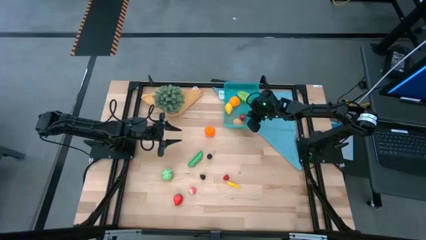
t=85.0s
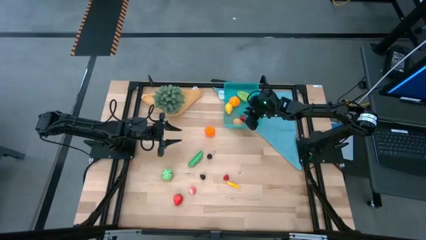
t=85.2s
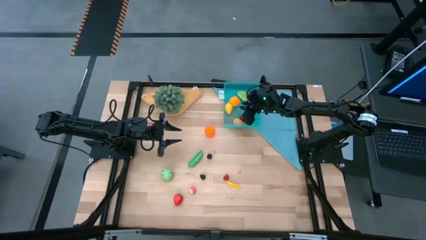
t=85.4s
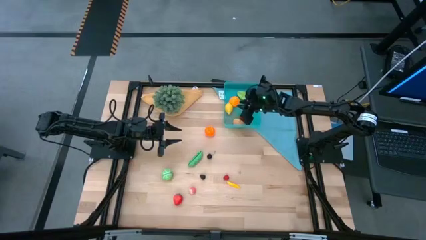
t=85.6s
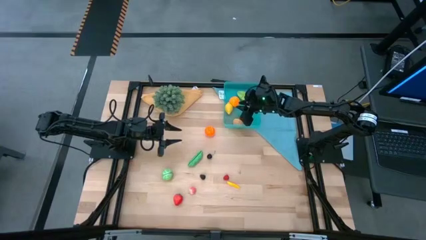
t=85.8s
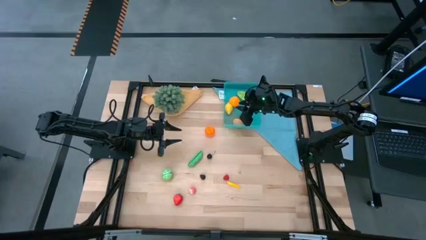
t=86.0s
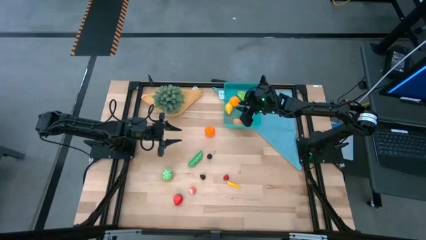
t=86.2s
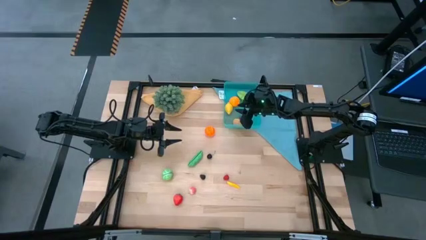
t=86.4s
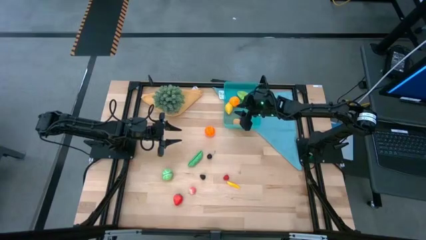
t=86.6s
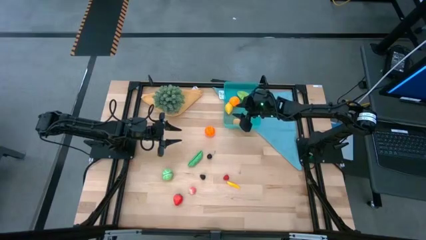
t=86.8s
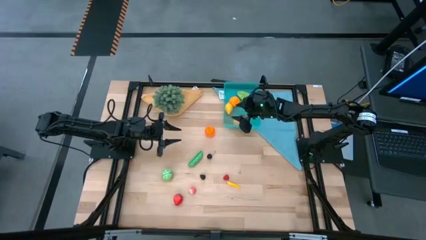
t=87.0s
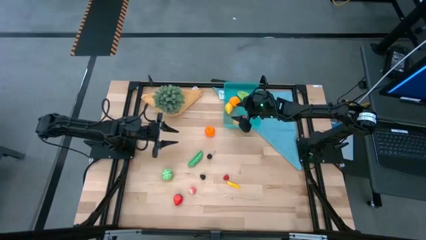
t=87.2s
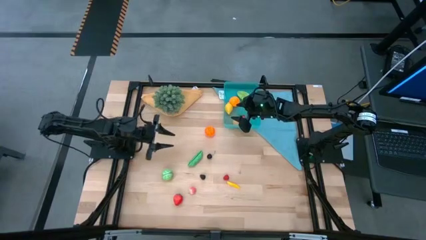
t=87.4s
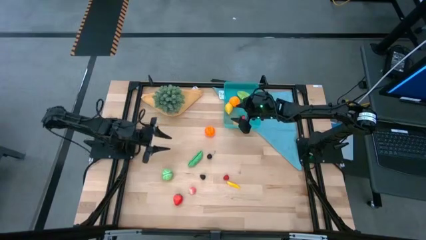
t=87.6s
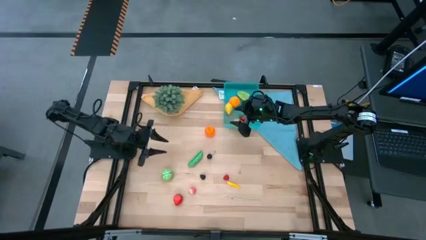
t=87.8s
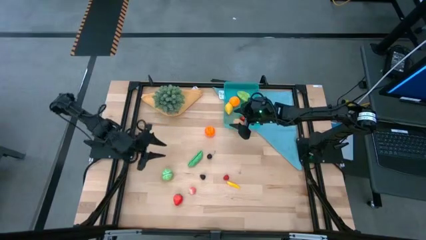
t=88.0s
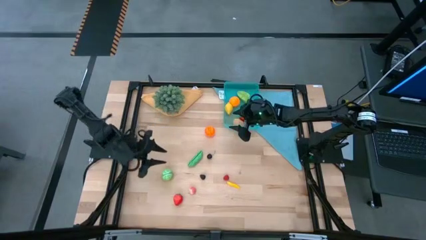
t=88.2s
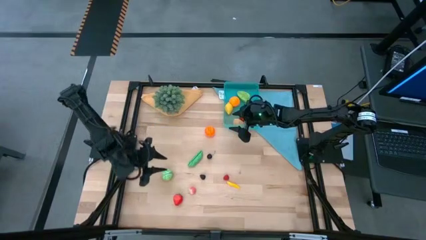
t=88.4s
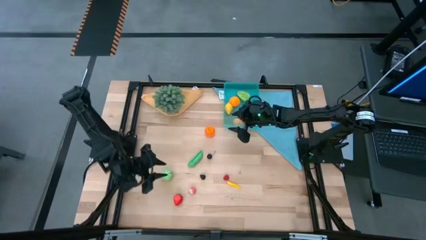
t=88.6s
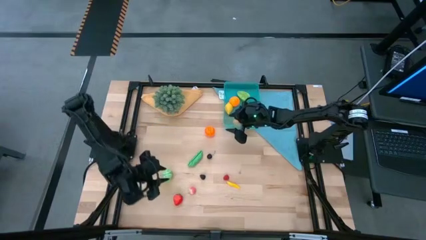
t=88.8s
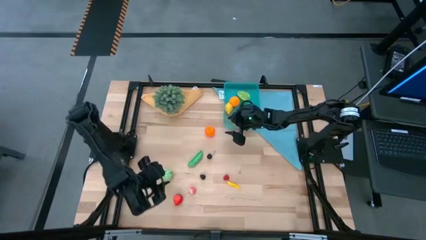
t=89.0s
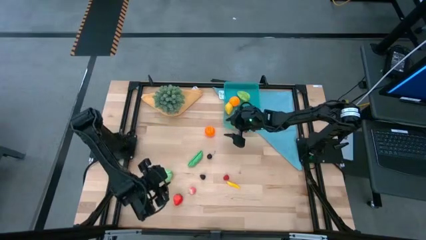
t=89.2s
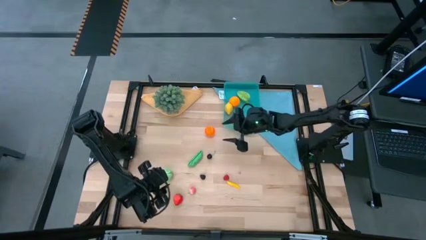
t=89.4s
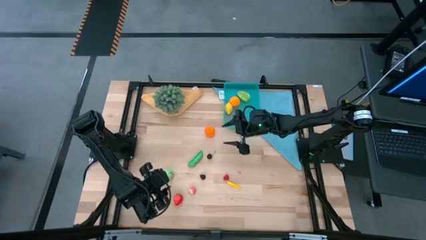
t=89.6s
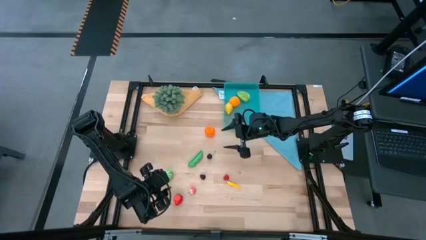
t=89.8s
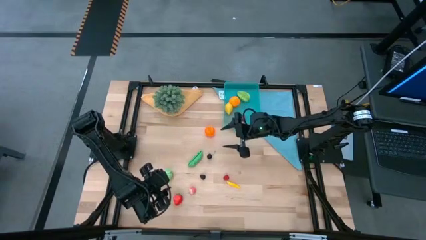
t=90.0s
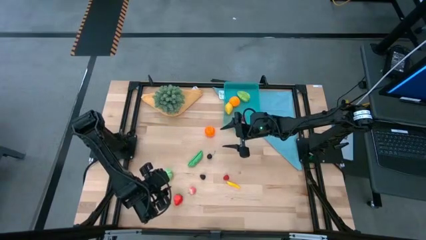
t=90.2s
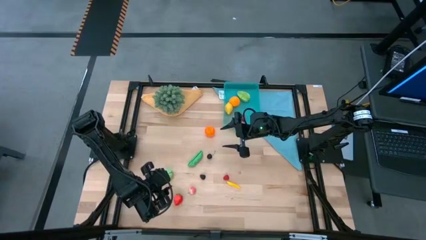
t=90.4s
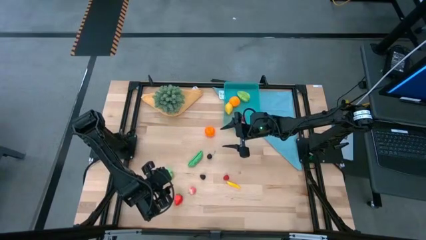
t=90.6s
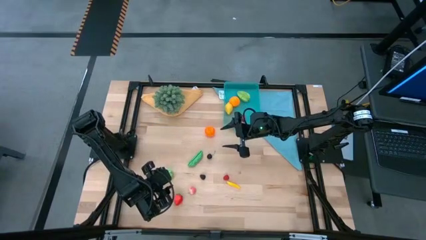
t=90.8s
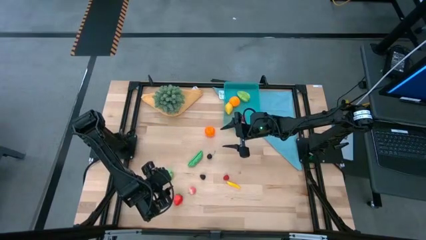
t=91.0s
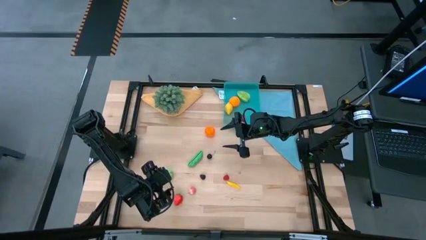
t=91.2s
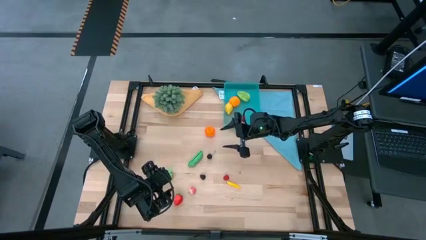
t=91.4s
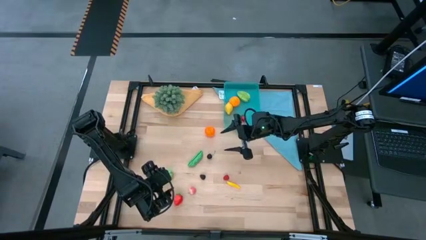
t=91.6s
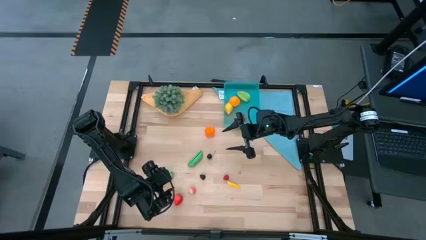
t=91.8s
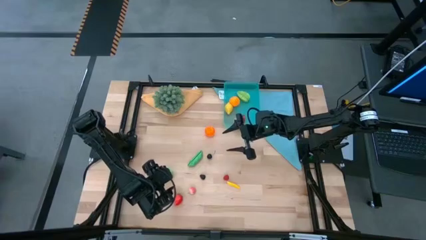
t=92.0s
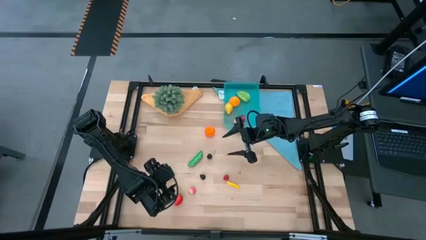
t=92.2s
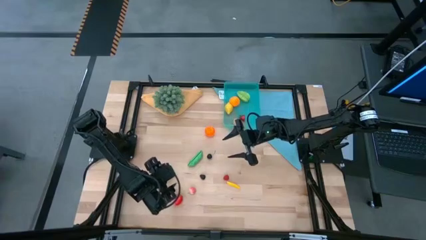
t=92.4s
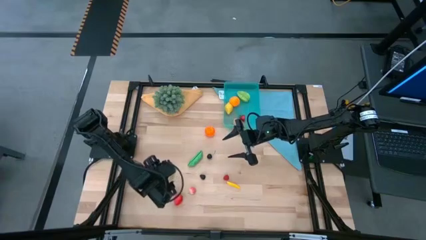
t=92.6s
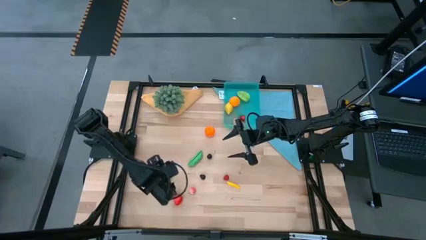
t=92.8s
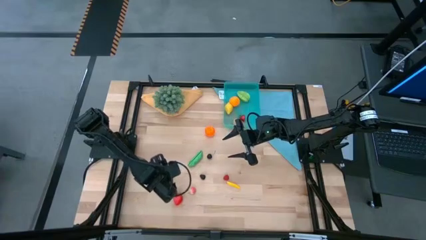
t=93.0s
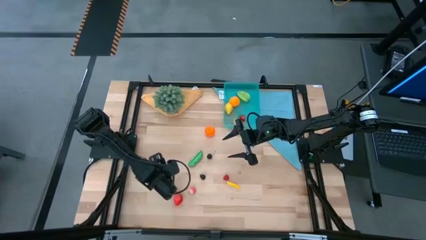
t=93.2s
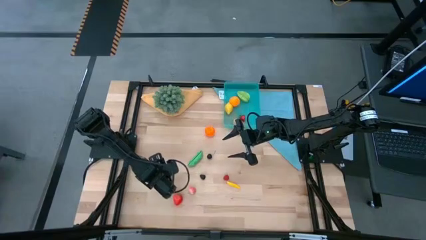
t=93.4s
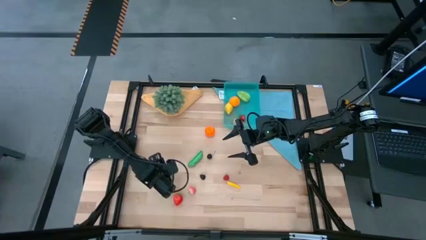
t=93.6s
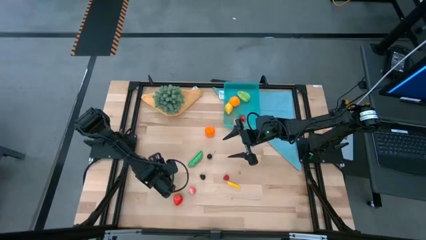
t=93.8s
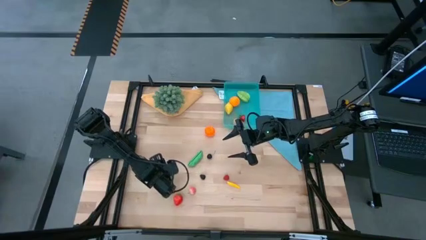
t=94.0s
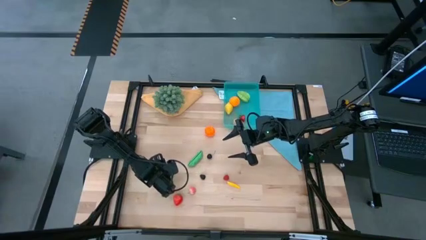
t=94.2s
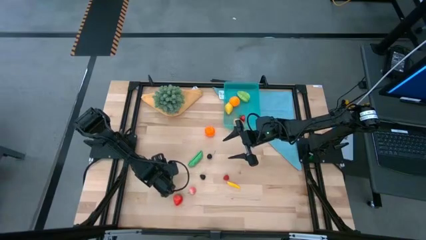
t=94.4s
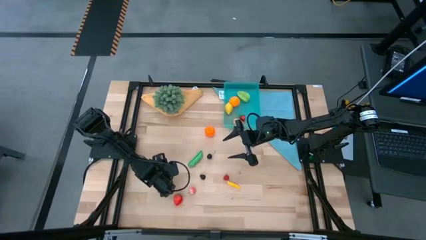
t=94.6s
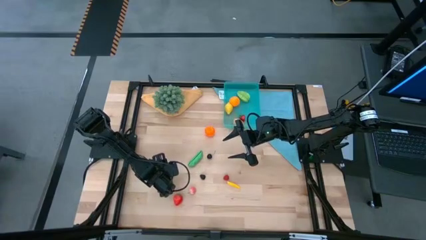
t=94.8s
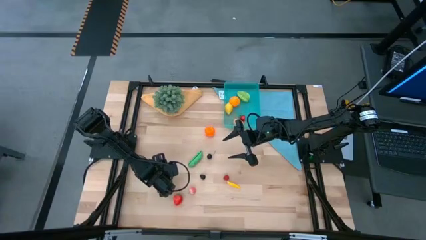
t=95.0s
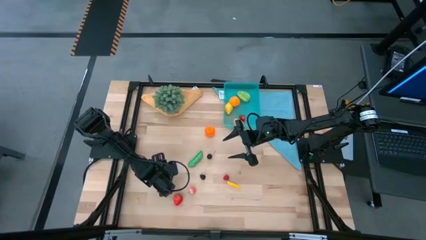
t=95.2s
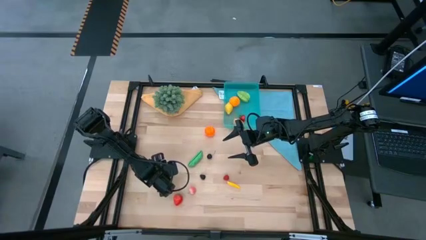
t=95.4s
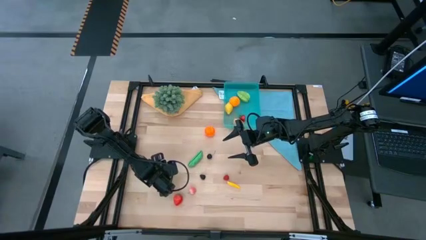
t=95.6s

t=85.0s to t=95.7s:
Task: Pick and placing Produce into tupperware
Put the green cabbage into the blue bin

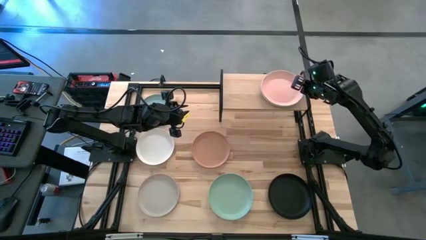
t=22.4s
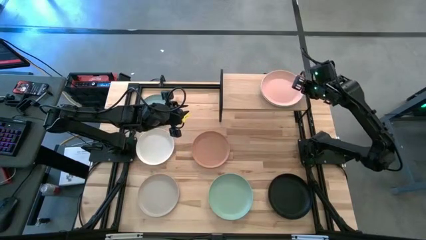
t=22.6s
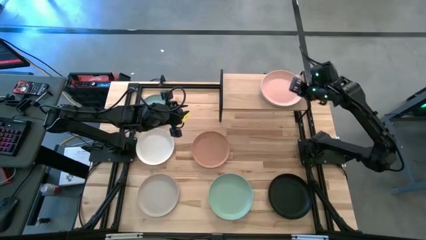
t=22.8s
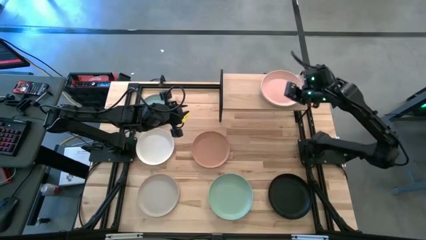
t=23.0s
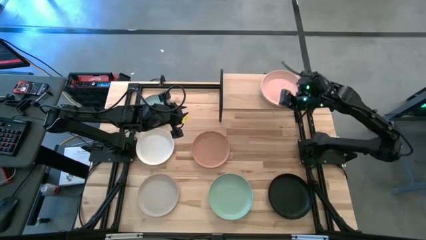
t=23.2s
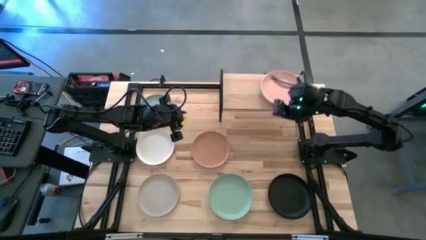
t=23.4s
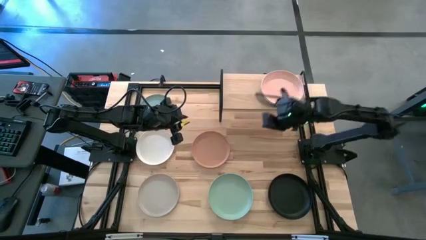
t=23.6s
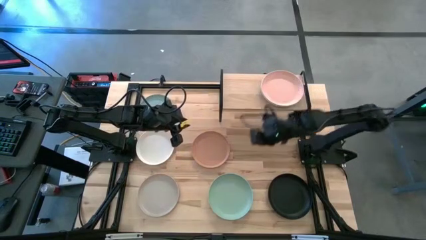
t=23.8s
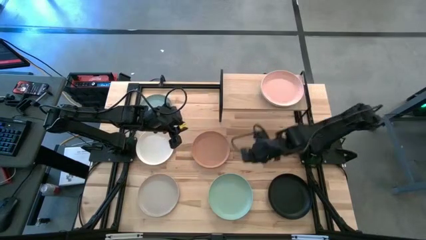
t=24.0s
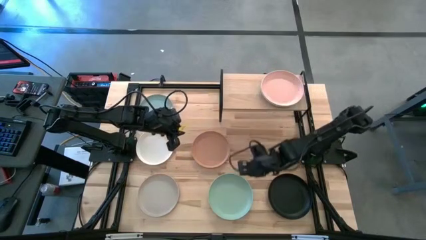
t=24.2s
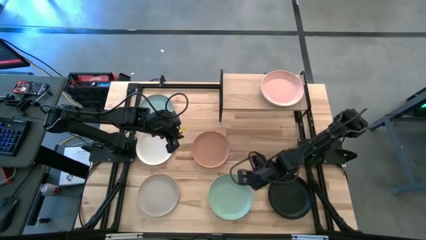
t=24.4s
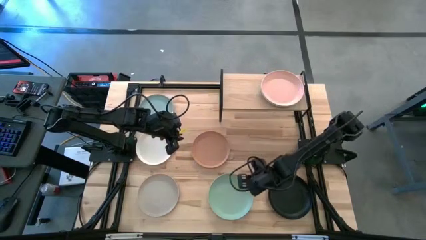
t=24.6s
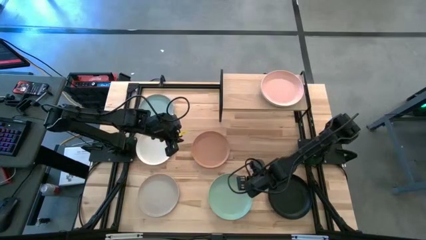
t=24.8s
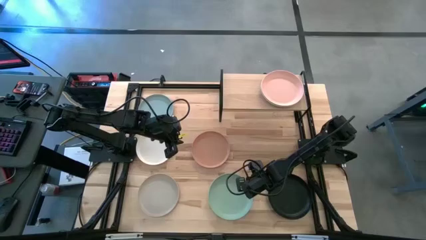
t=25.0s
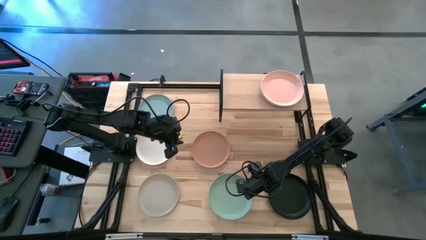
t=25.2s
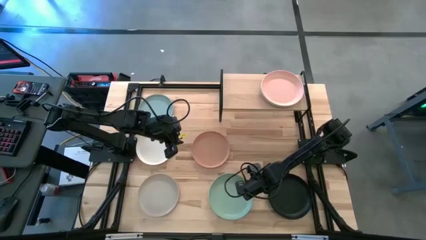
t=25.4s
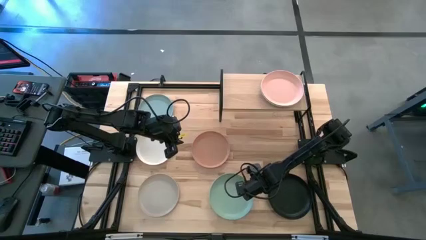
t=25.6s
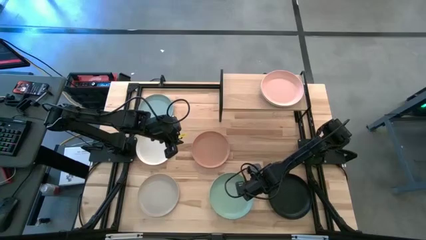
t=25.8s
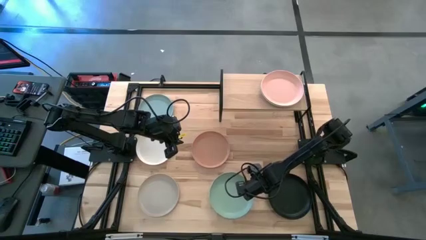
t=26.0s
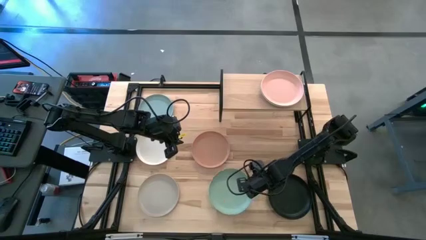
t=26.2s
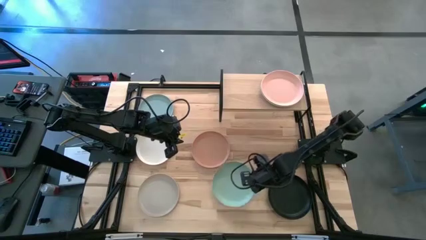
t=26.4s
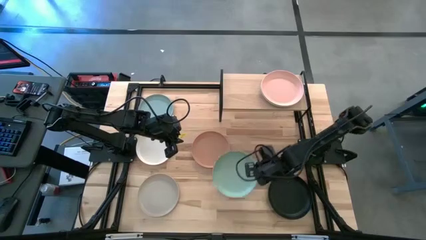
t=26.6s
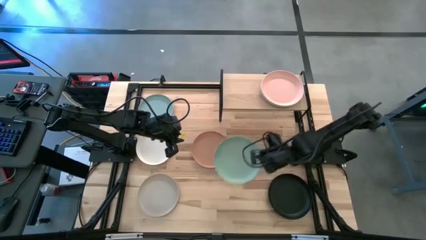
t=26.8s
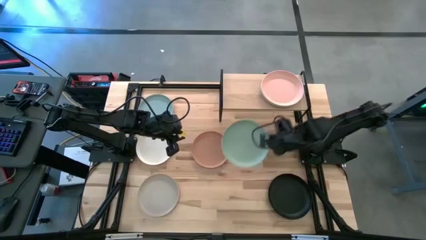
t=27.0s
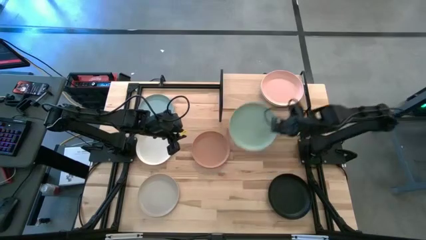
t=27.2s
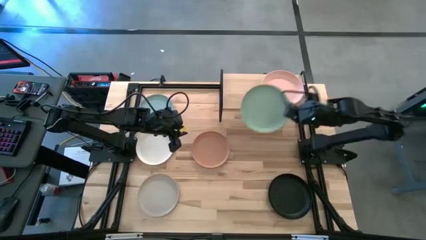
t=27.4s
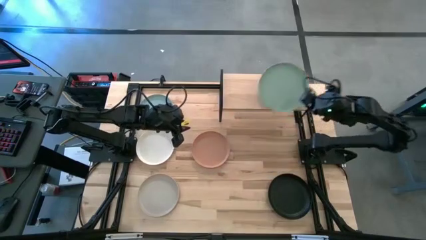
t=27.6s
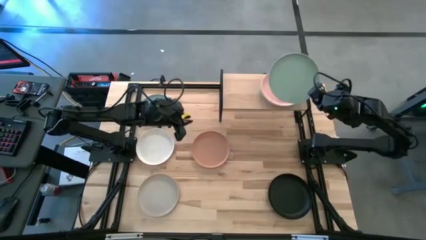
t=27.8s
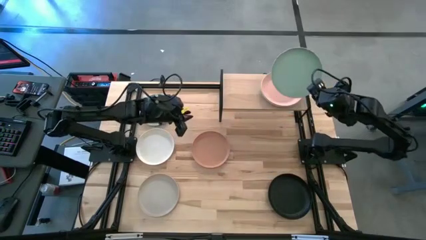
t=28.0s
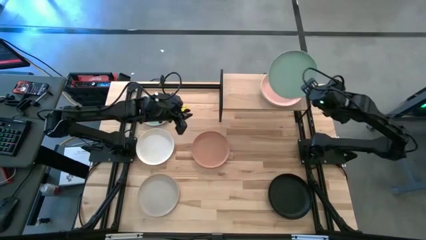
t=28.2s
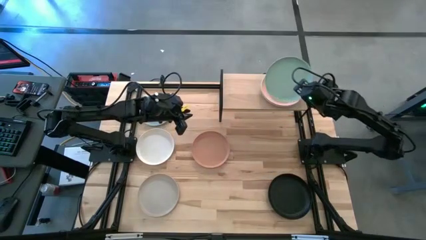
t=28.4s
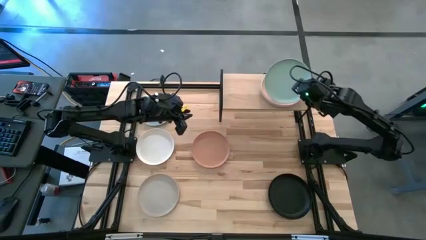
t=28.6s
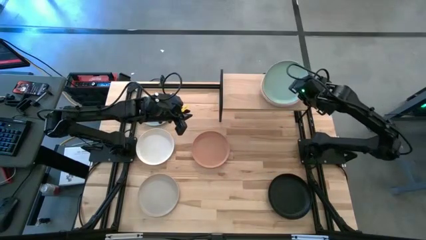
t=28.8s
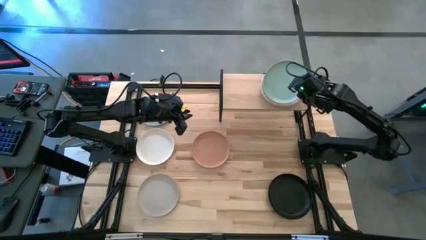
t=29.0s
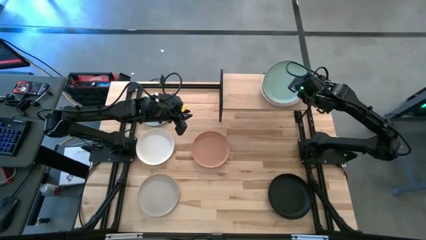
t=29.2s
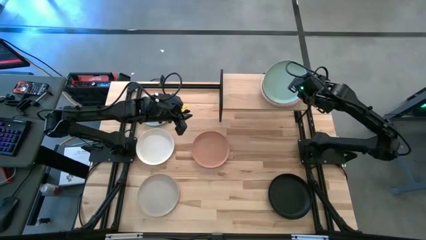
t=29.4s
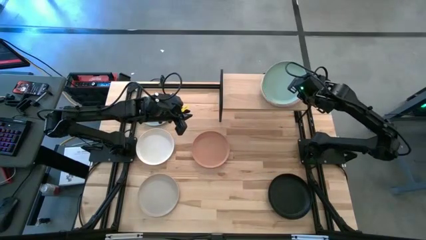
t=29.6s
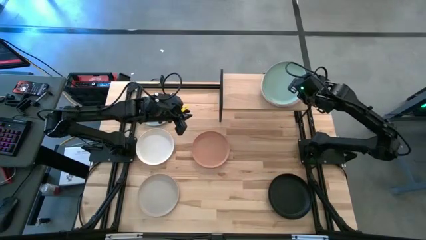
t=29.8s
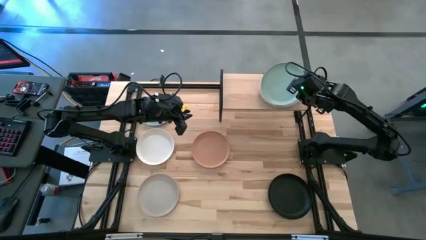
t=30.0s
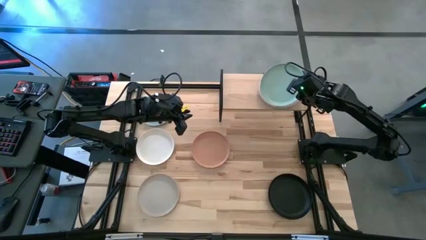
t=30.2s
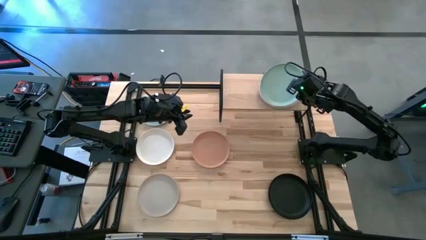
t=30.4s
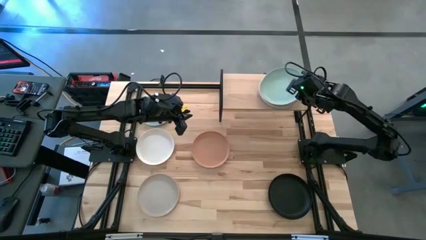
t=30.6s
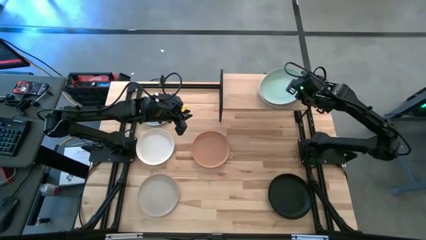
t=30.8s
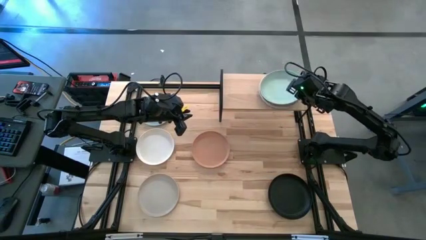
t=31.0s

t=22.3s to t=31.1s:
Task: Place and stack plates onto a shelf
Stack the green plate on top of the light brown plate on the shelf
